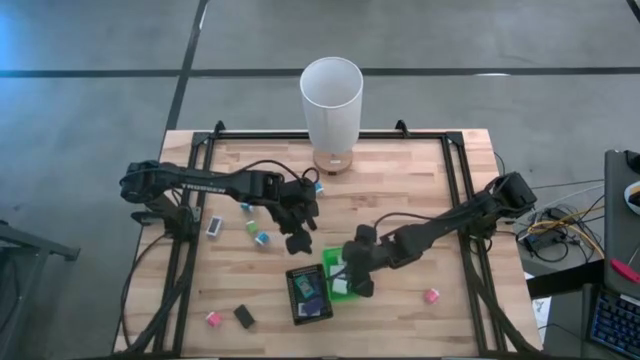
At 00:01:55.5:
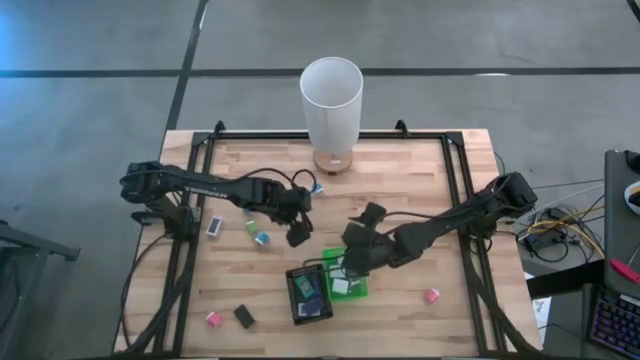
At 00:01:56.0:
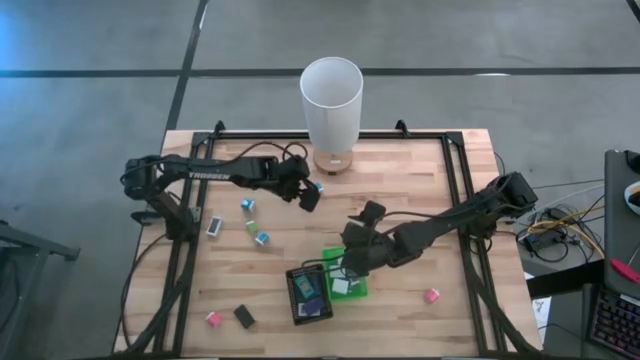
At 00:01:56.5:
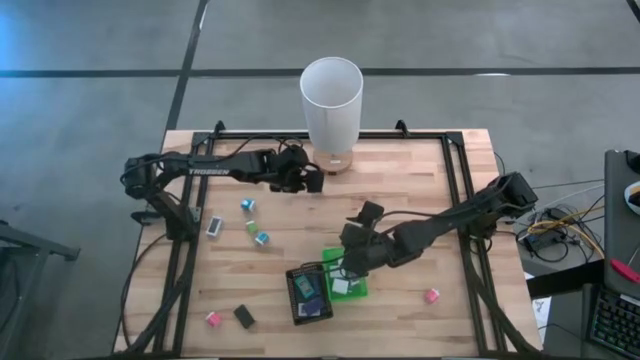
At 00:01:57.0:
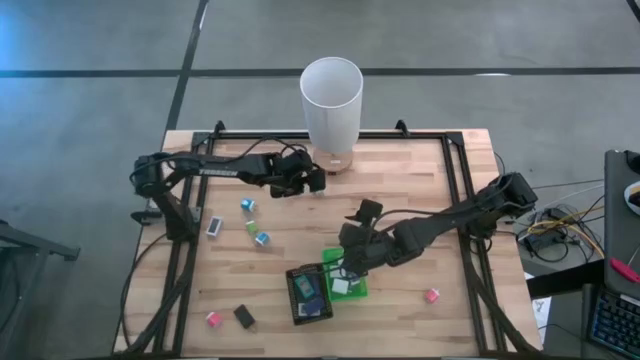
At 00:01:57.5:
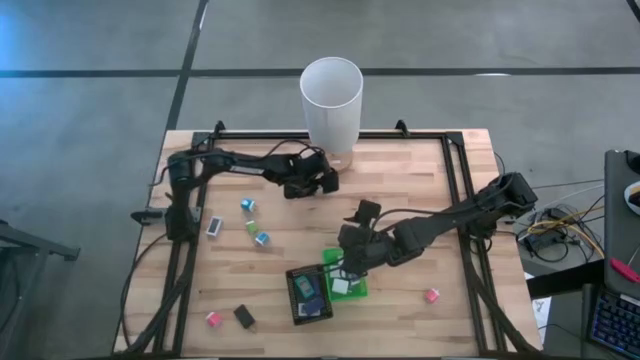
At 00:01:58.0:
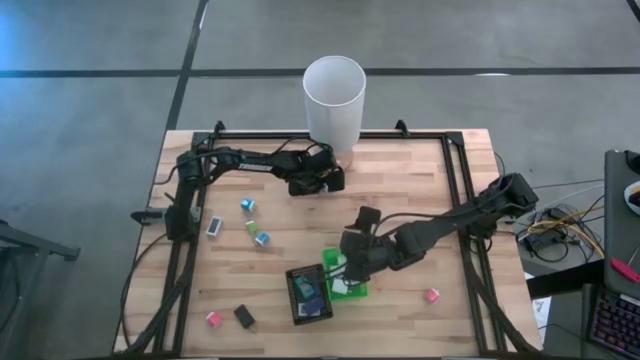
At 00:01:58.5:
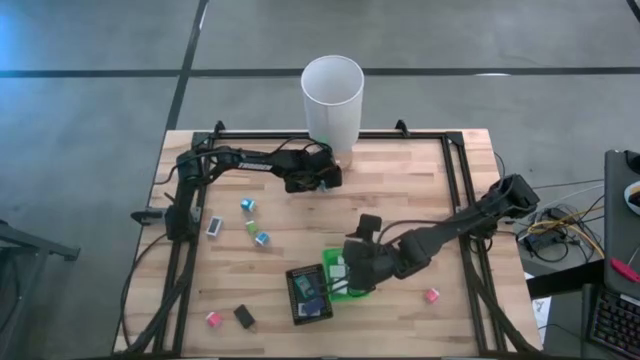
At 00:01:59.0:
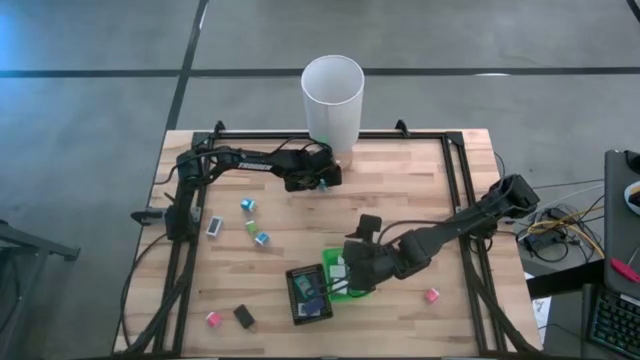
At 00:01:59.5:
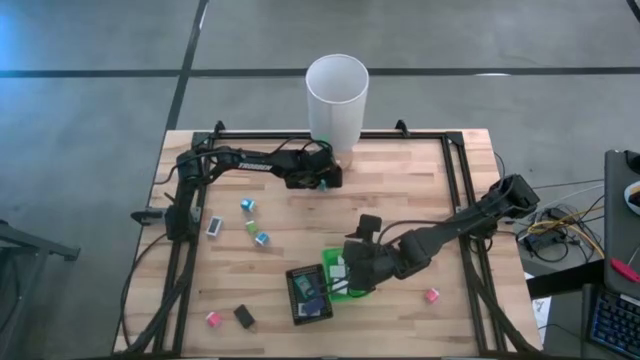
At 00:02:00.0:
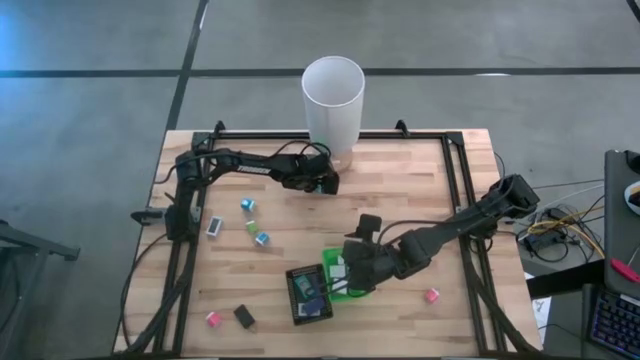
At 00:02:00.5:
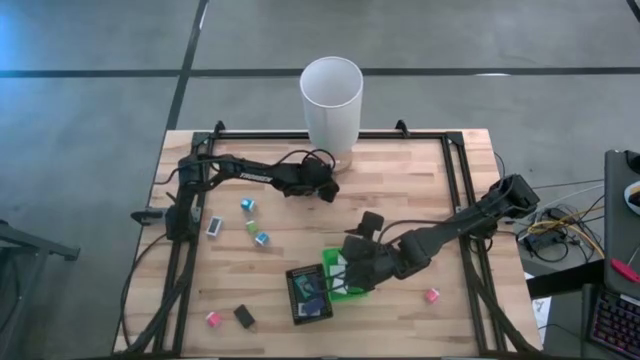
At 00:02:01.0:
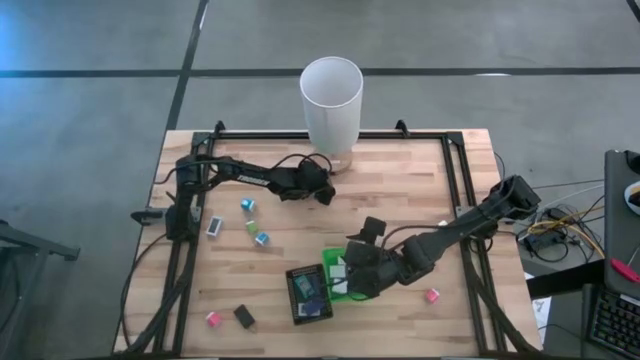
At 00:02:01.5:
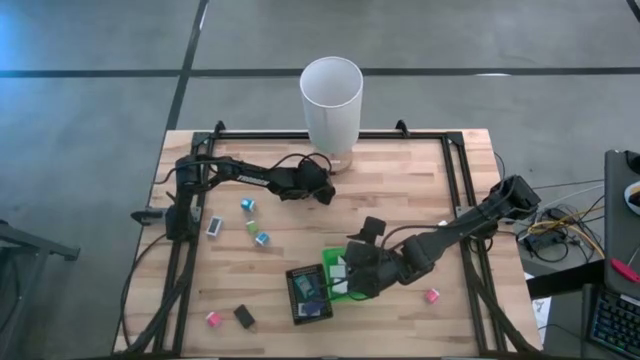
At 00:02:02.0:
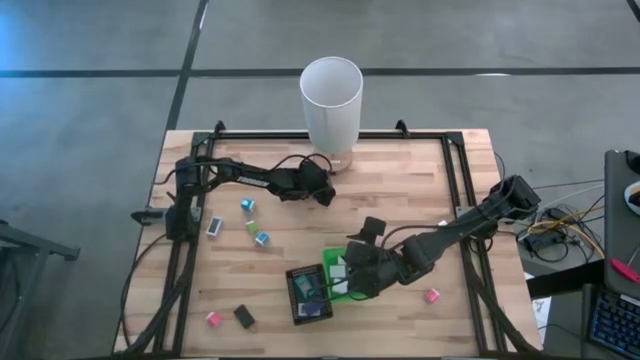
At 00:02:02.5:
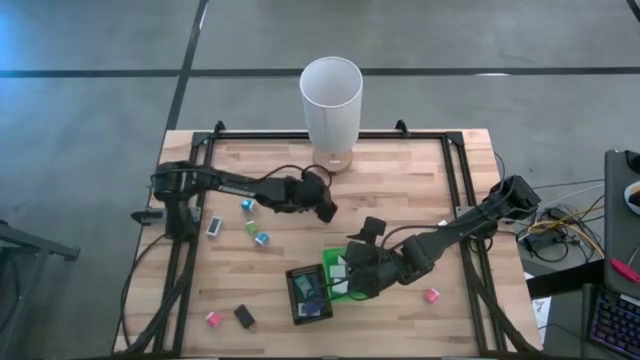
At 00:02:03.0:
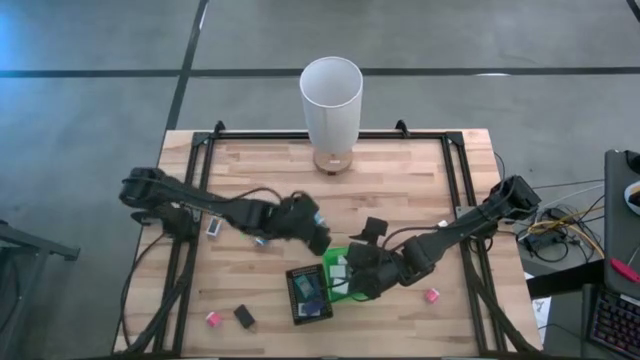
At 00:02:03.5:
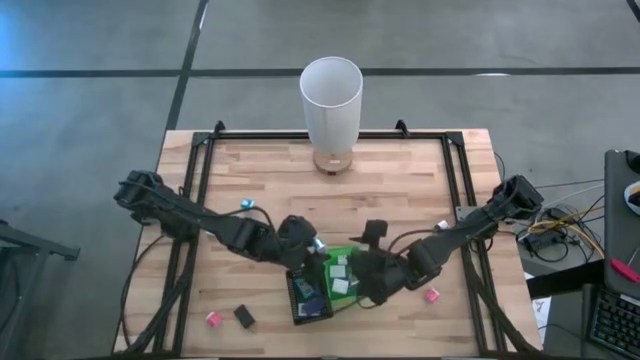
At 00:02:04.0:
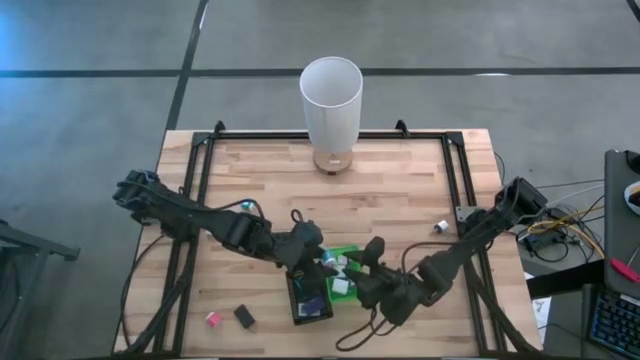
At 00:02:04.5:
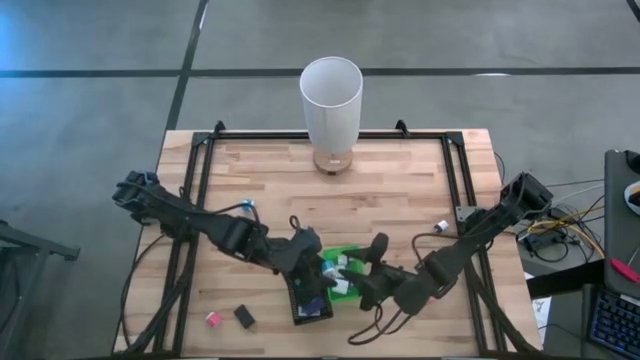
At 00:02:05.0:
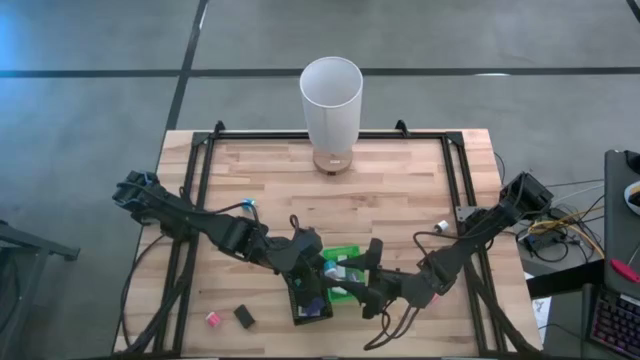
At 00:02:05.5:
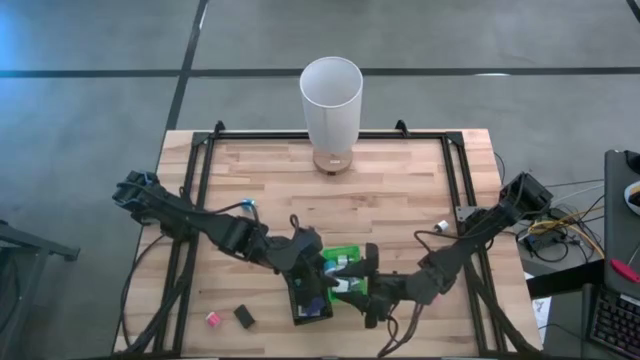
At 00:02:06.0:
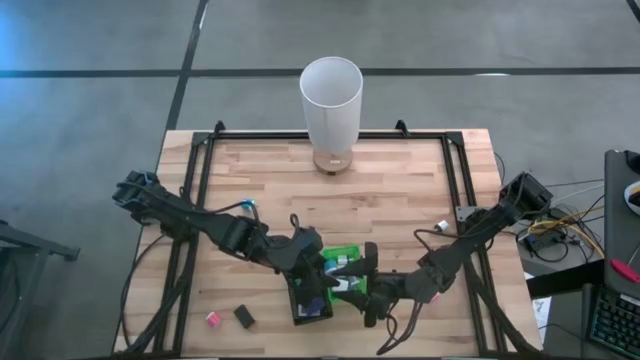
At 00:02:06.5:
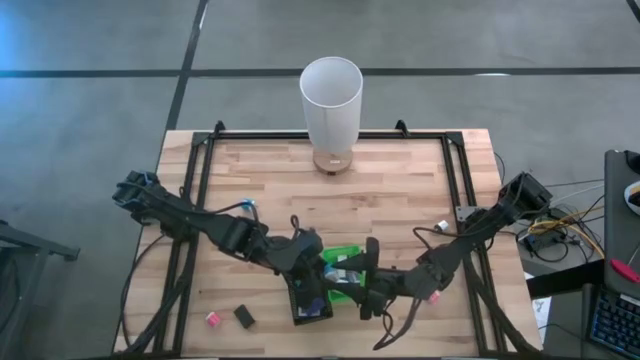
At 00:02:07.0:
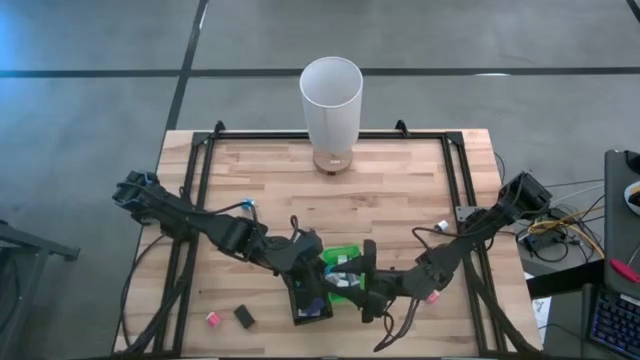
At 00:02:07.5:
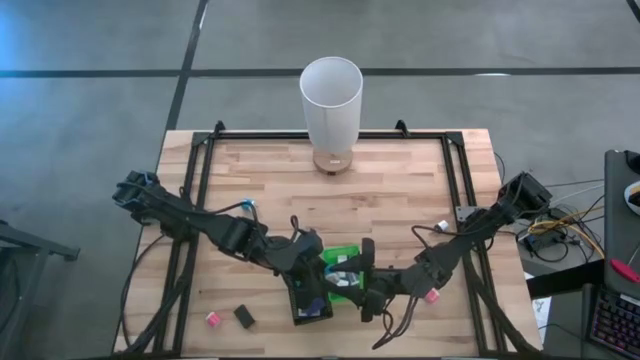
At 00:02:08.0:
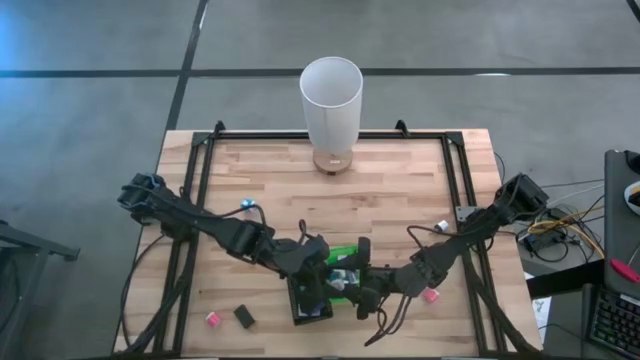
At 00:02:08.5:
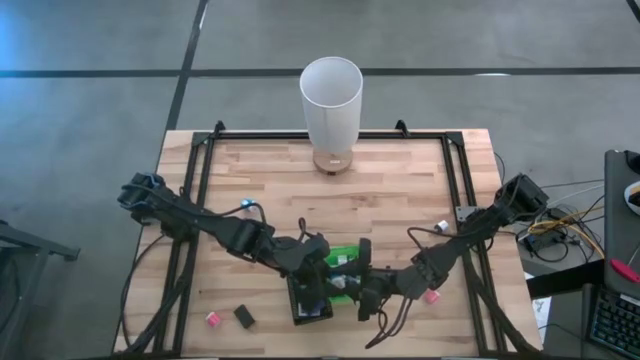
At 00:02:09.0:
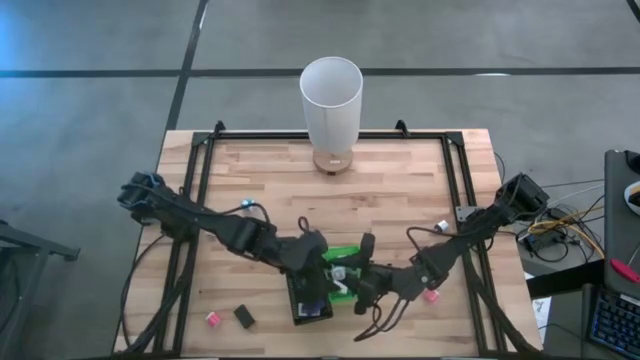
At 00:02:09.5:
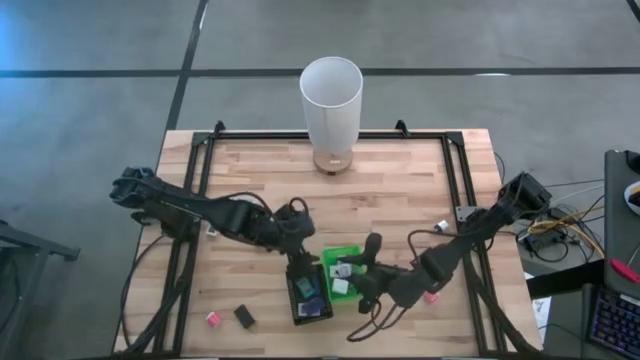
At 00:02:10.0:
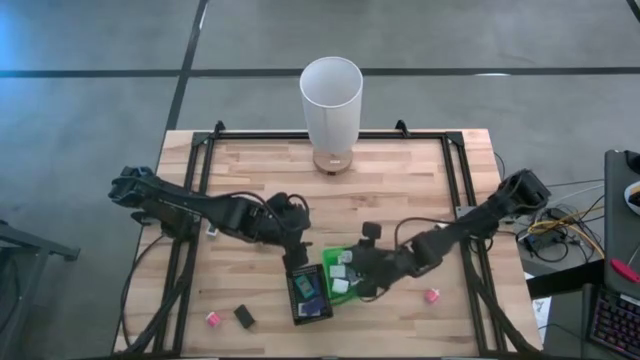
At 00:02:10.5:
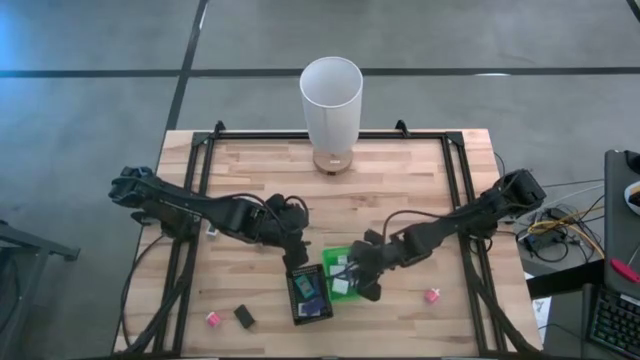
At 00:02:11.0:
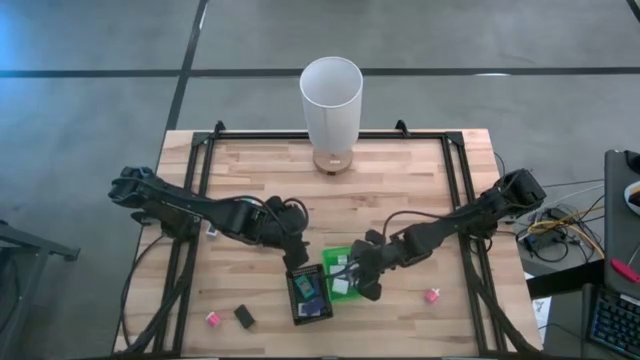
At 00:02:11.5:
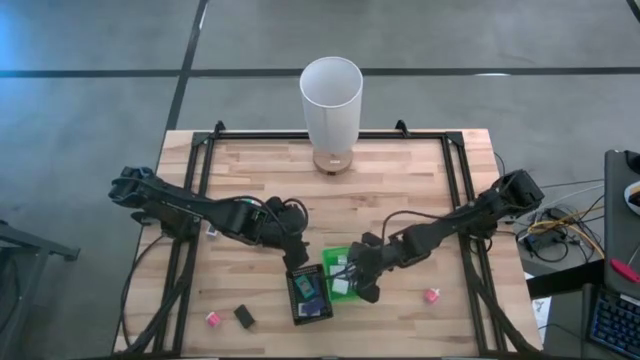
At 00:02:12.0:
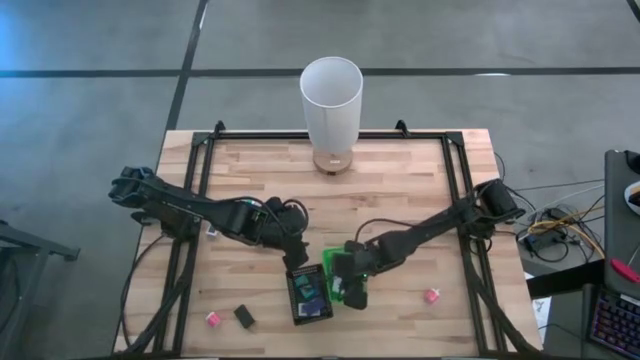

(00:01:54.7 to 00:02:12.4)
Task: Pick & Place Office items
Put the right blue charger adapter into the green bin

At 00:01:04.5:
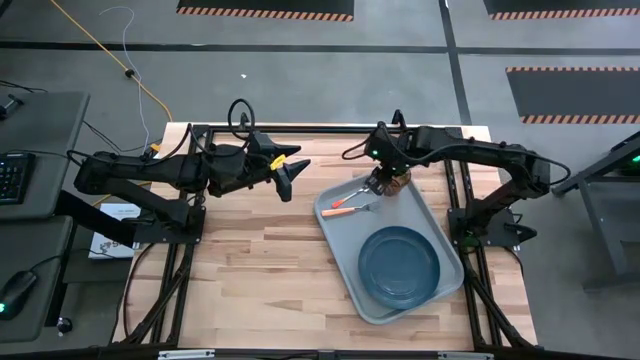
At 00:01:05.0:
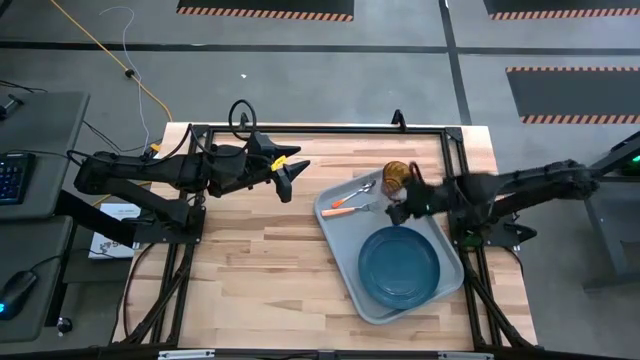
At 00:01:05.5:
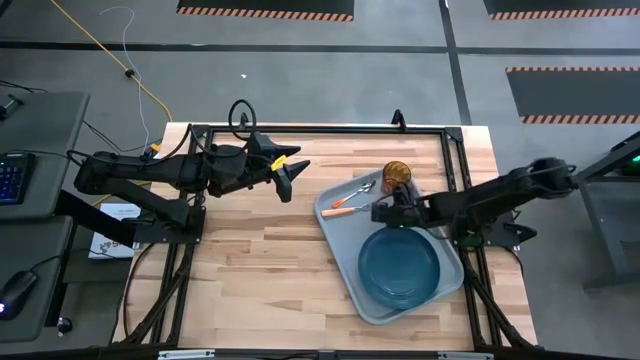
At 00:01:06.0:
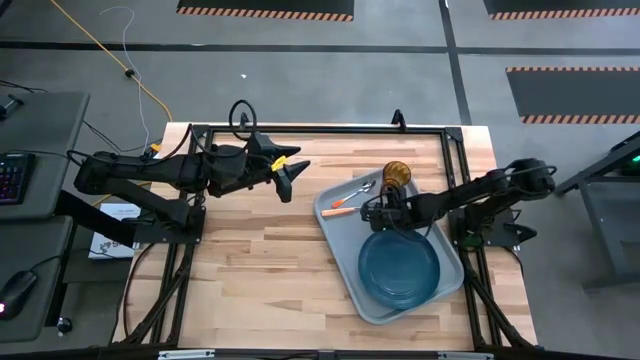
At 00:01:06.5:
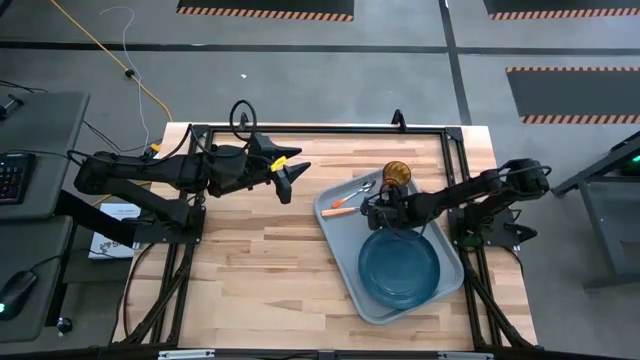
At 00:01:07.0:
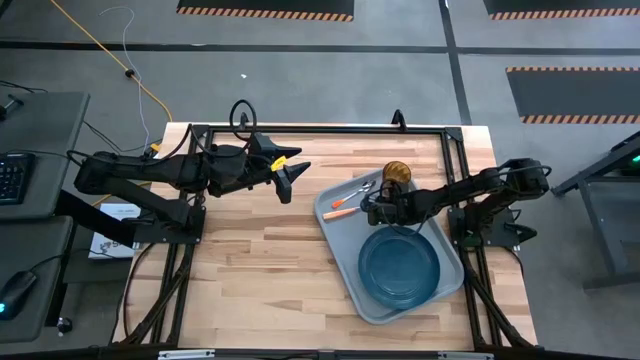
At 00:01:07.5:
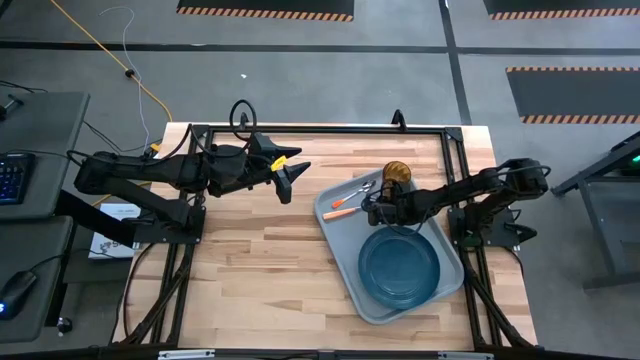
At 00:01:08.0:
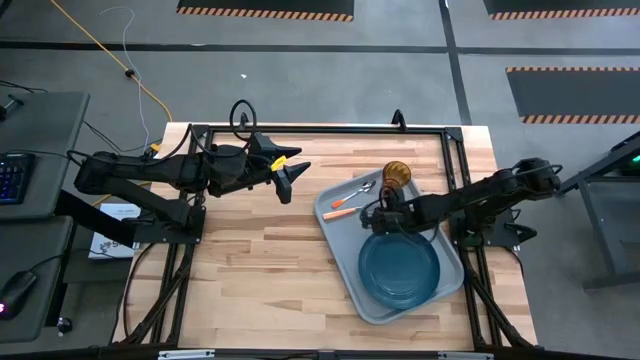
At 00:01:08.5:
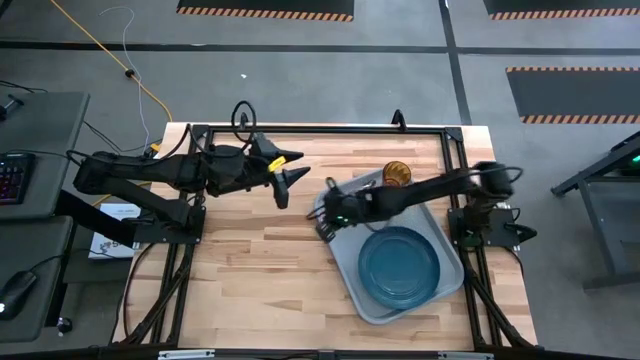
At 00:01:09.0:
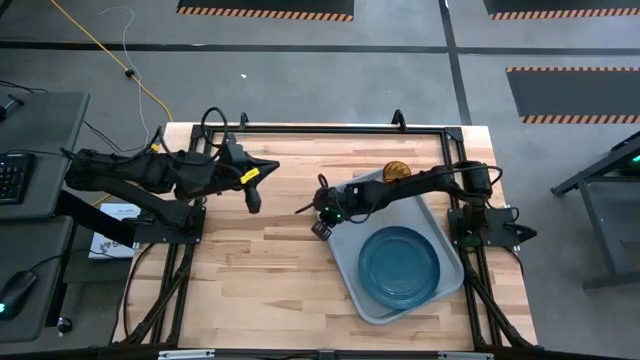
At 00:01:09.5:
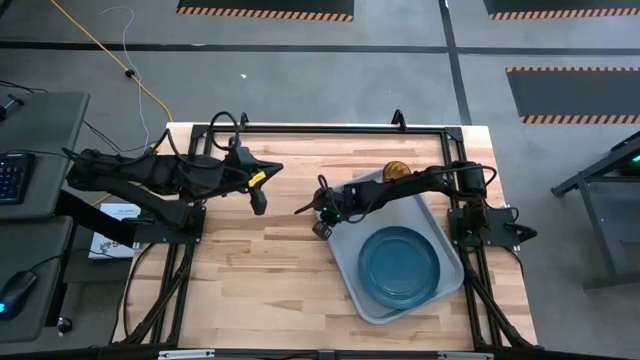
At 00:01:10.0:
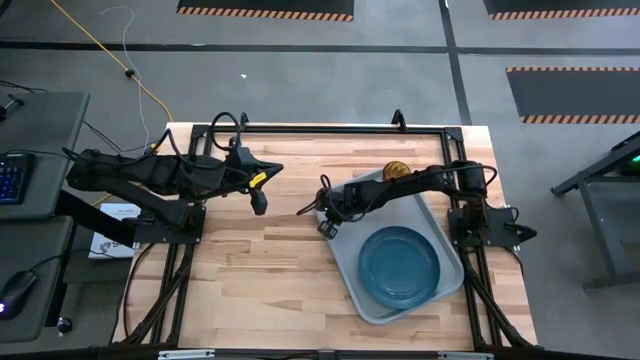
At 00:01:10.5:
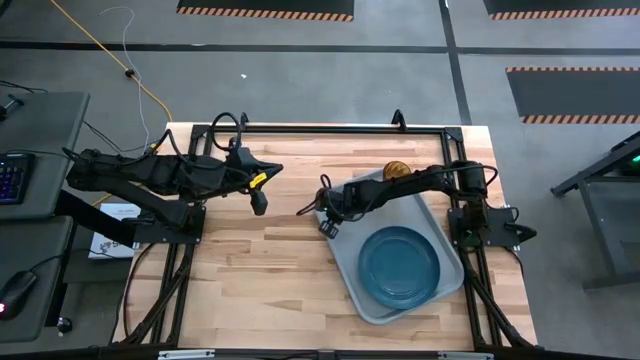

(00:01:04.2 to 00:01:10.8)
Task: Pick and place plate/cup/fork/spoon on tray
Adjust the light orange fork on the gray serving tray
